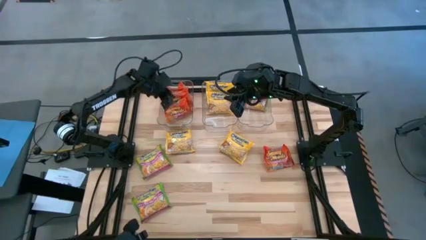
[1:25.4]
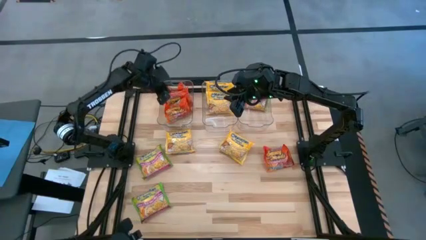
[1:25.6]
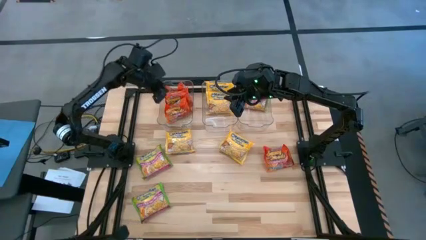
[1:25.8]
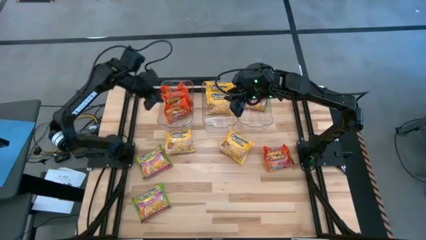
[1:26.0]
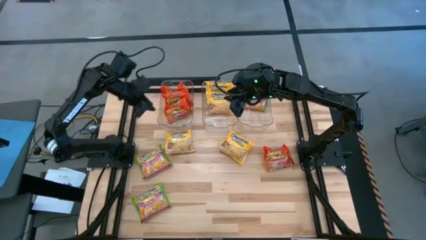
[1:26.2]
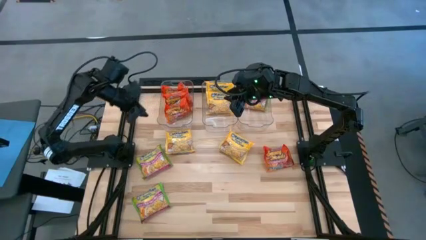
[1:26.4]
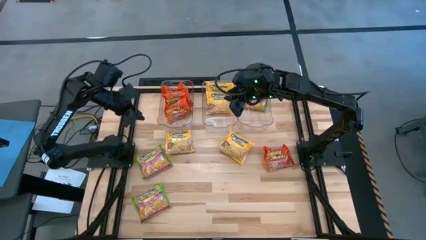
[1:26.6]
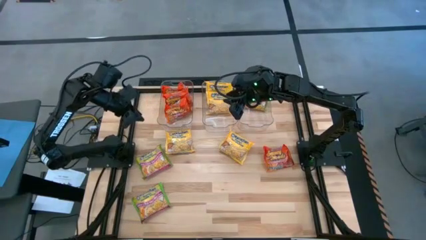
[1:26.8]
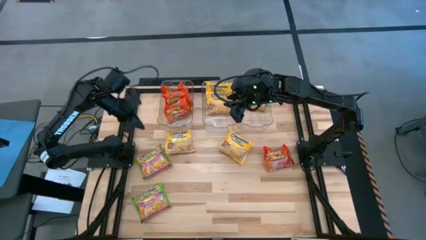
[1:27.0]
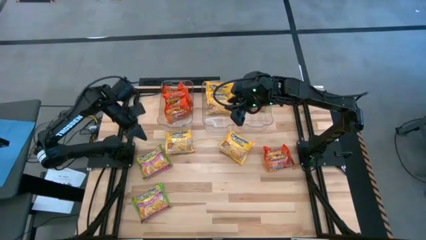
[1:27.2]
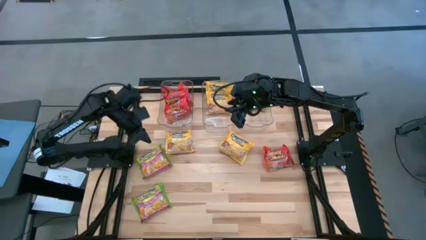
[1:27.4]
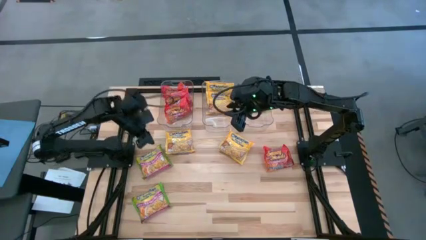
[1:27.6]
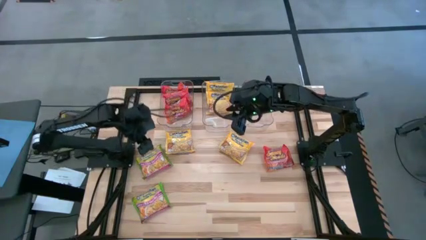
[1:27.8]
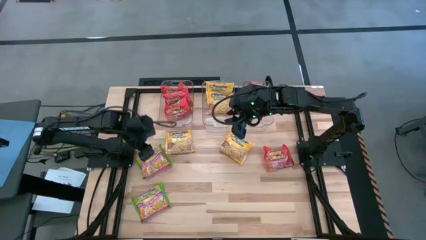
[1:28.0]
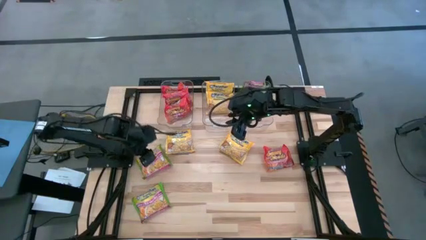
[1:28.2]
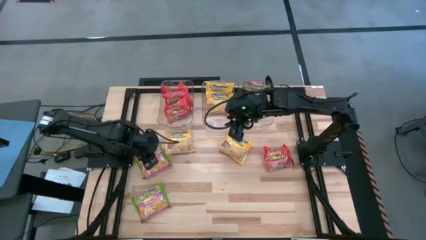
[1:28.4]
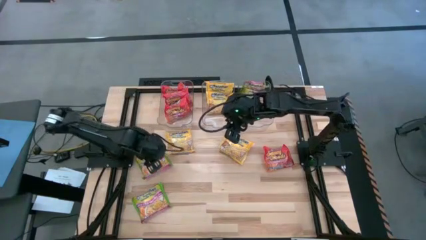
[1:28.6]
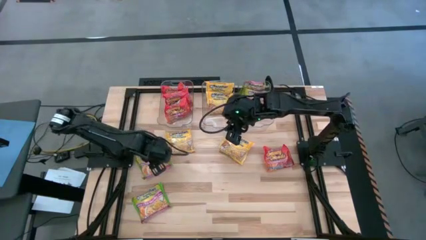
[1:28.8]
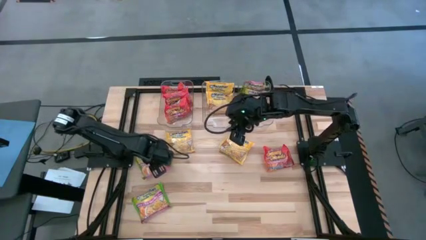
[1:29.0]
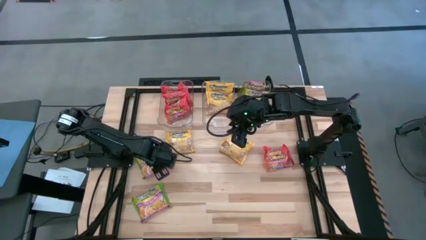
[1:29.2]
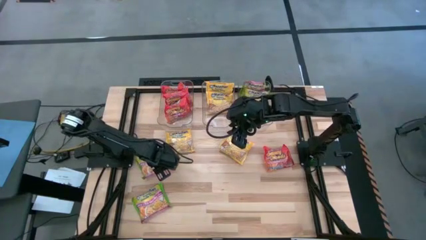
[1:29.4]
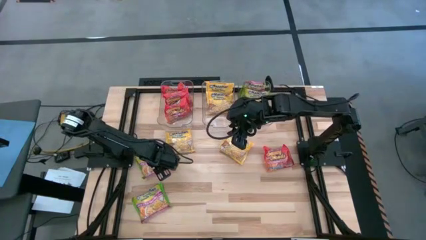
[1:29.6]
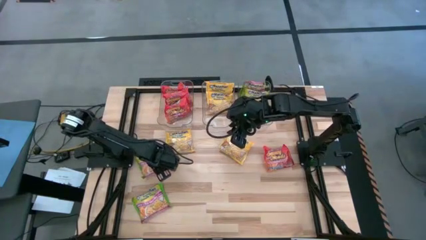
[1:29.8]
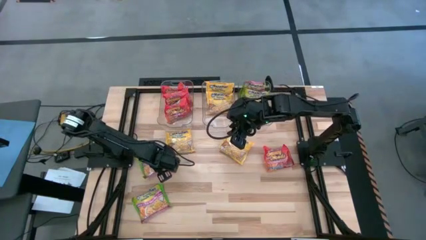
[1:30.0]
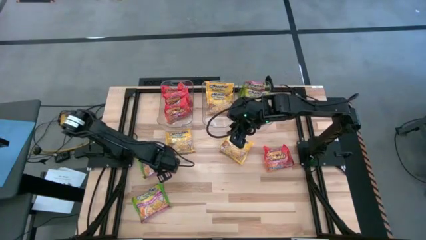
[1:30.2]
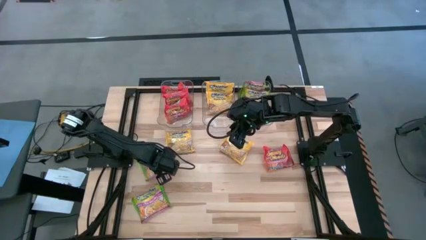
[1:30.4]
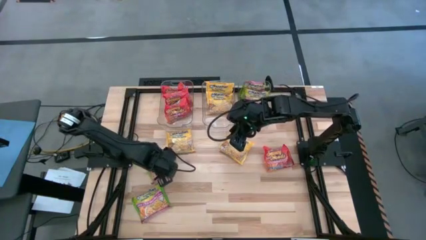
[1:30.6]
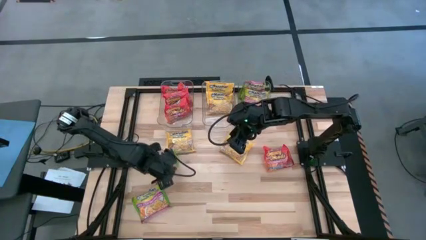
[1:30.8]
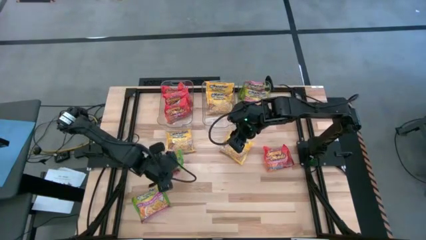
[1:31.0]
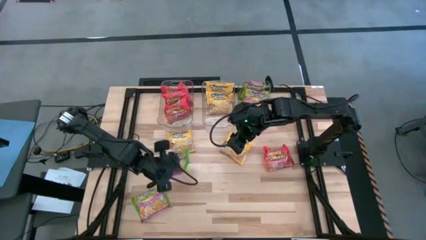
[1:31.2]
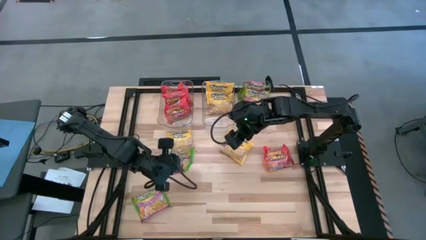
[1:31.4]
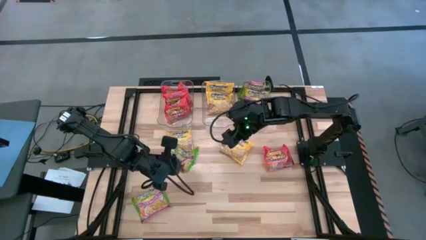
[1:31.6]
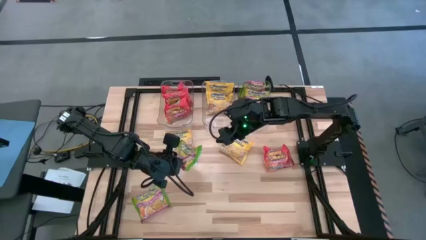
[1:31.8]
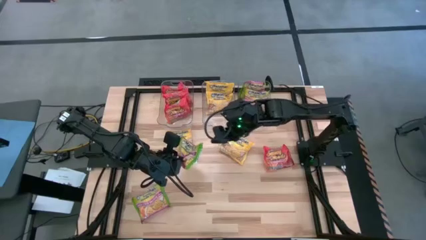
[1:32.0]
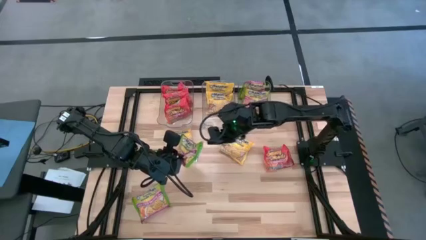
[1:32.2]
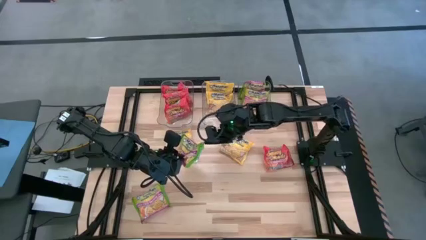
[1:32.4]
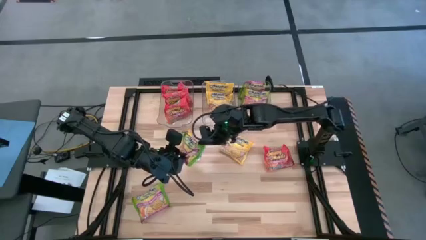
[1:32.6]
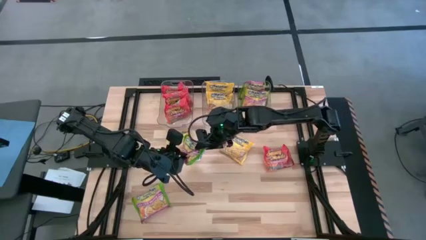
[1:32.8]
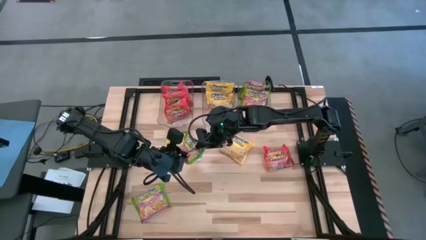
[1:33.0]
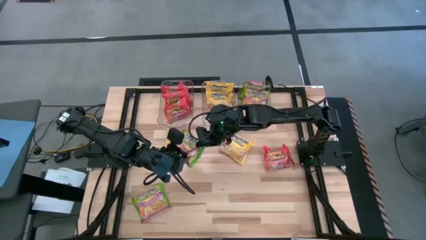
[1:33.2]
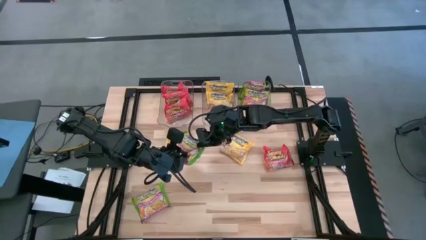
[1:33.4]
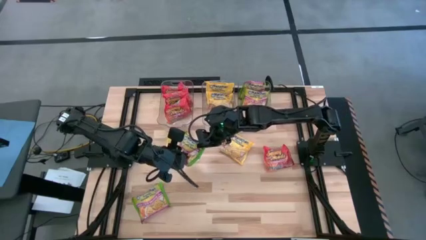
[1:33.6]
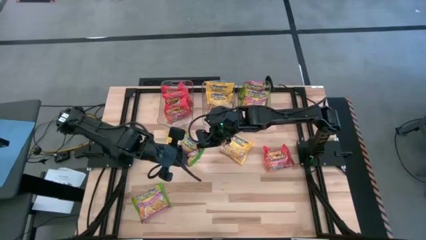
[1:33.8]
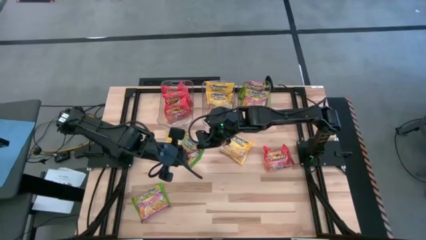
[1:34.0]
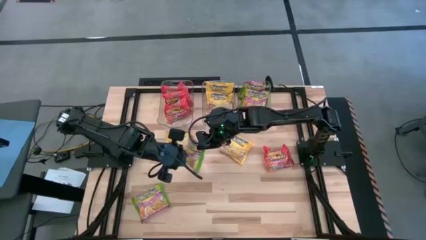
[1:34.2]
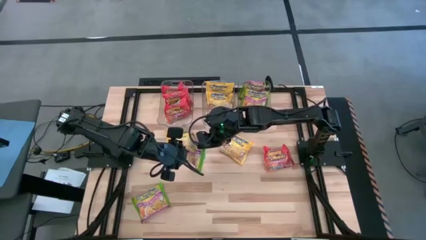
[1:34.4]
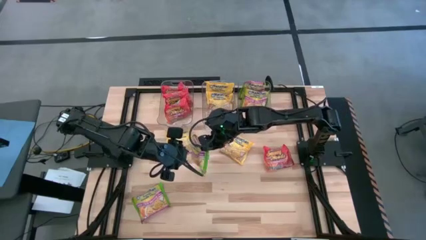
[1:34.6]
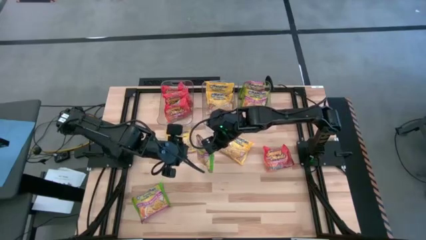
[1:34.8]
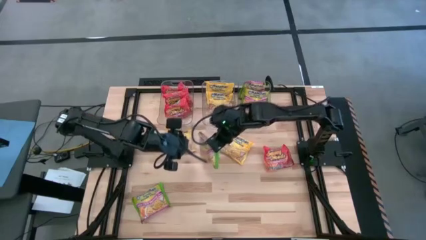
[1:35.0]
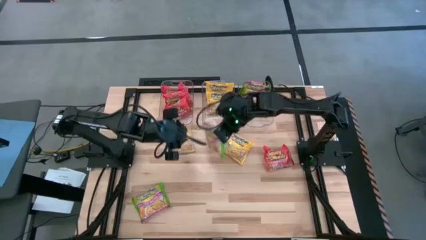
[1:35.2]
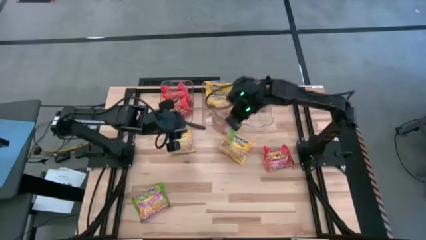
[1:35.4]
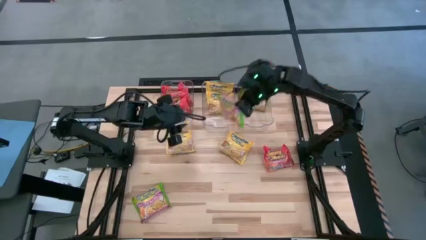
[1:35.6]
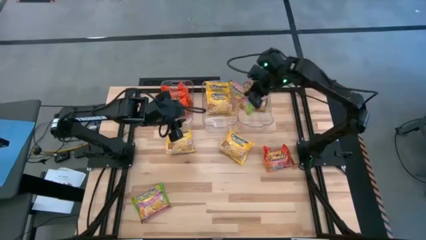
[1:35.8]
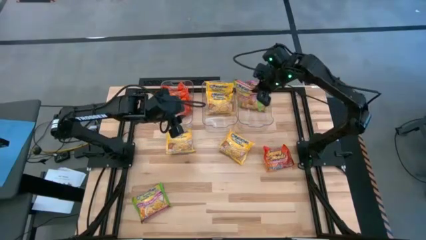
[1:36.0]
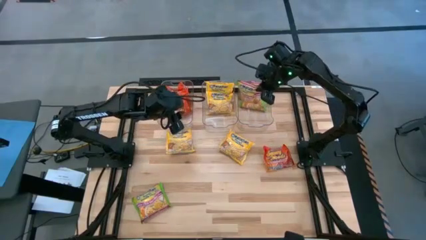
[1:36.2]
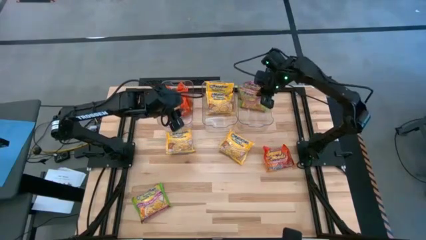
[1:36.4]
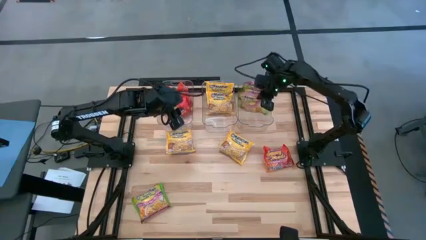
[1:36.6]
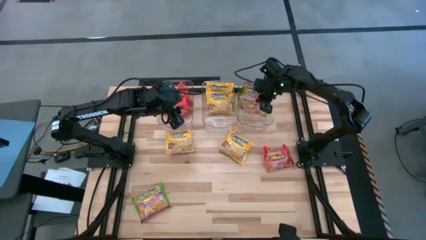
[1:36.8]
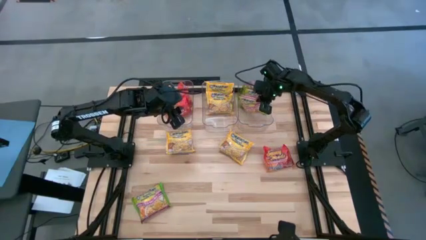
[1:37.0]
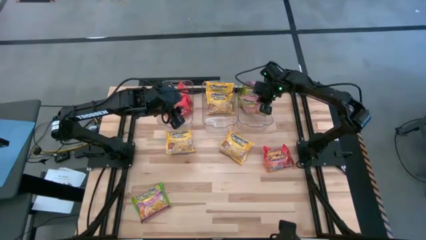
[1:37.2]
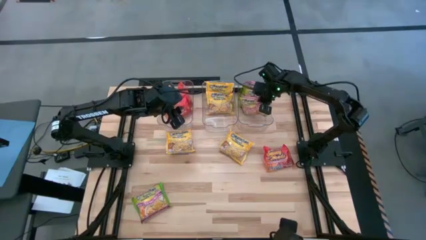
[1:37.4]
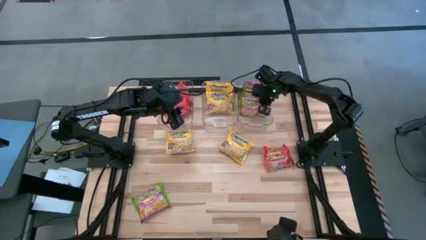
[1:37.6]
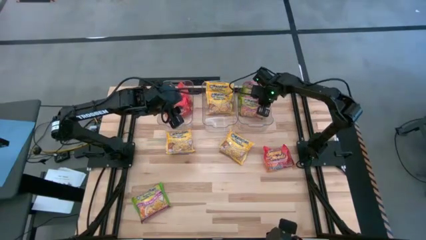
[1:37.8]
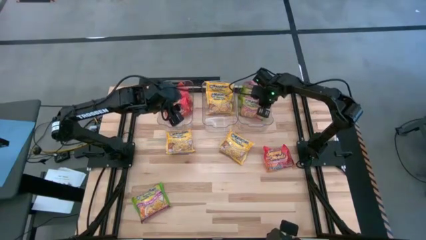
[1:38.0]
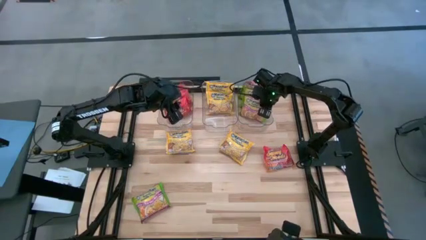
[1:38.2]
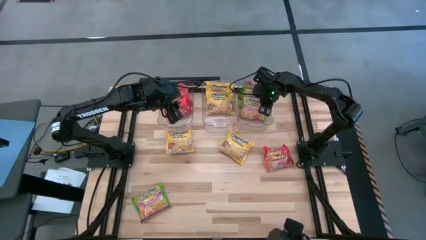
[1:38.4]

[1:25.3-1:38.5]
Task: Sort Maruchan noodles
Put the green noodle pack into the right transparent bin

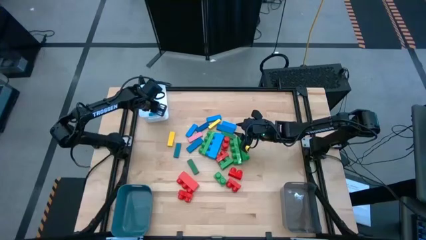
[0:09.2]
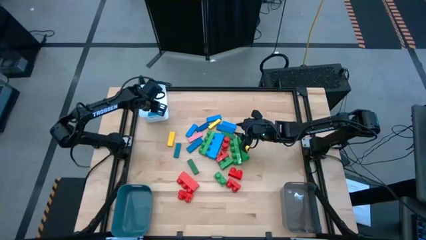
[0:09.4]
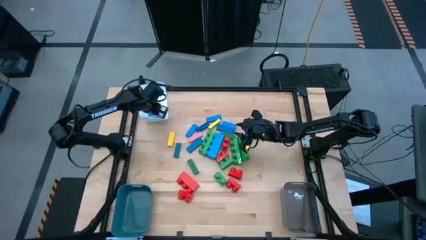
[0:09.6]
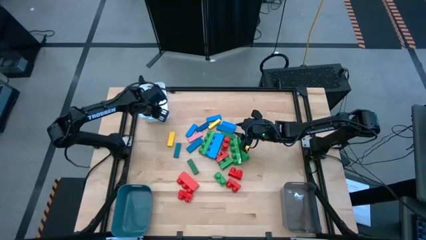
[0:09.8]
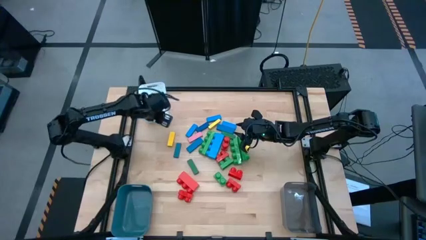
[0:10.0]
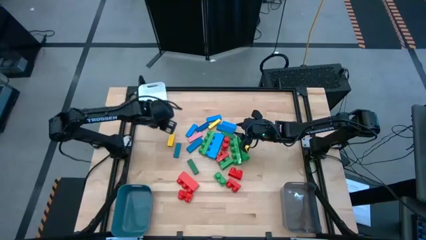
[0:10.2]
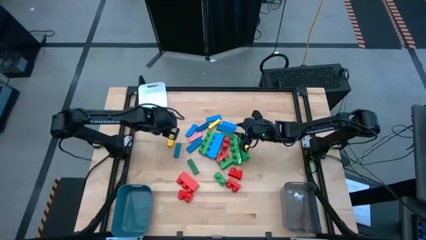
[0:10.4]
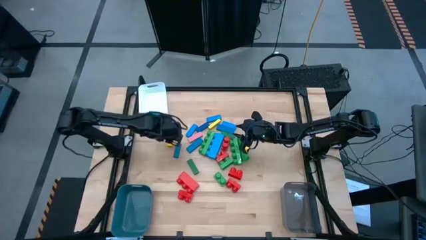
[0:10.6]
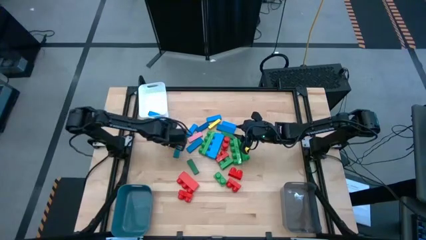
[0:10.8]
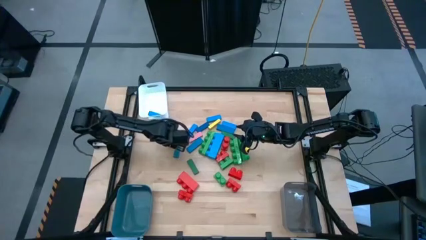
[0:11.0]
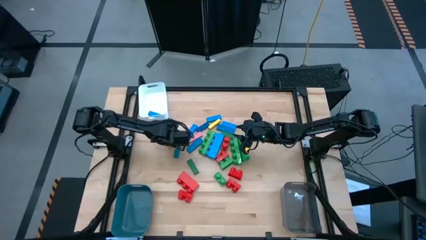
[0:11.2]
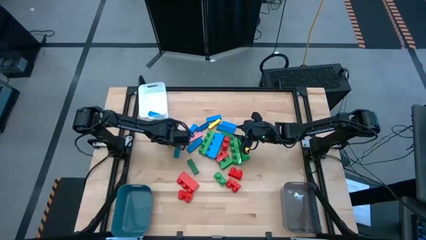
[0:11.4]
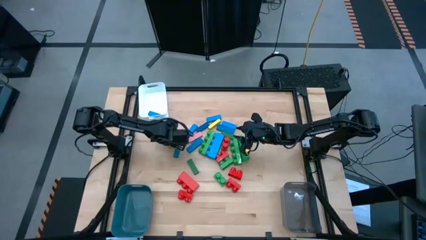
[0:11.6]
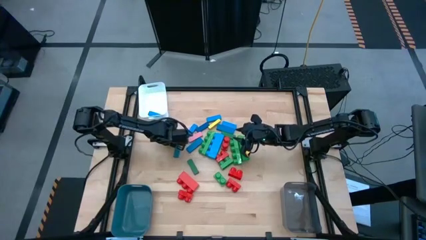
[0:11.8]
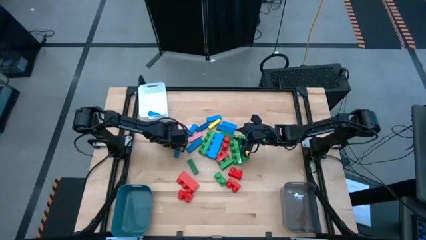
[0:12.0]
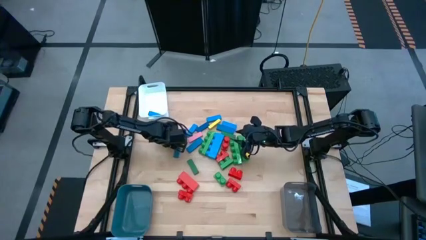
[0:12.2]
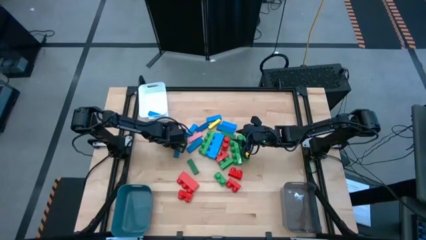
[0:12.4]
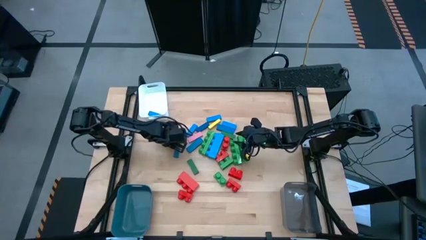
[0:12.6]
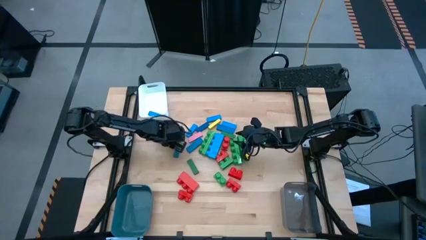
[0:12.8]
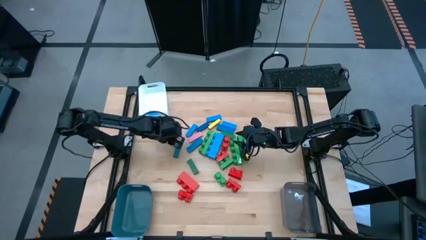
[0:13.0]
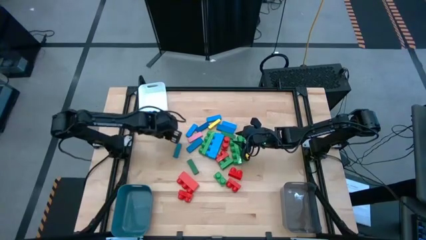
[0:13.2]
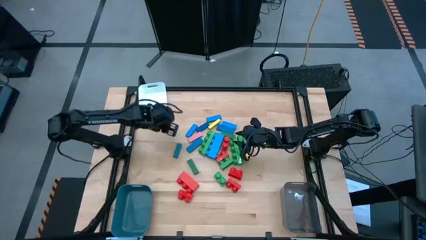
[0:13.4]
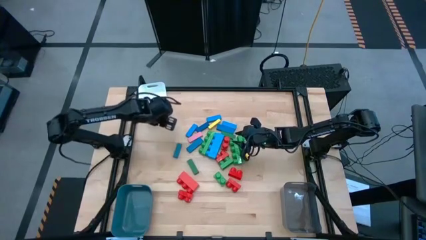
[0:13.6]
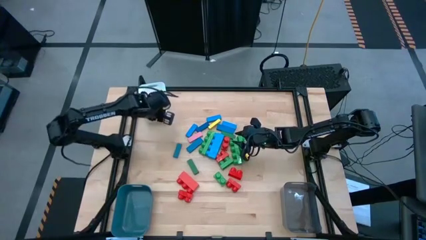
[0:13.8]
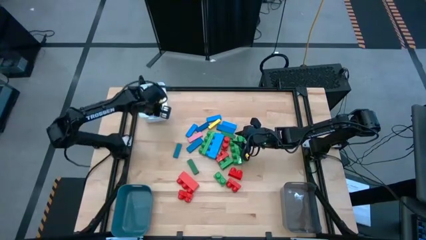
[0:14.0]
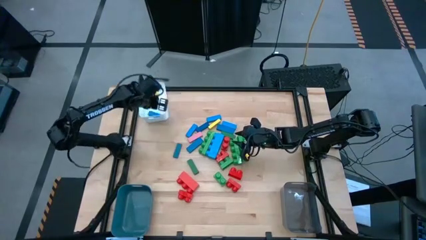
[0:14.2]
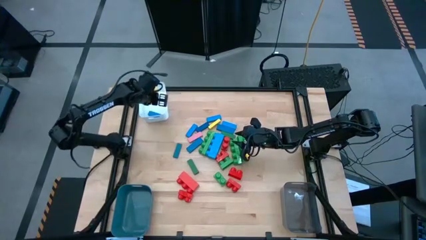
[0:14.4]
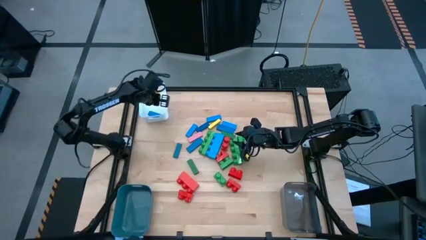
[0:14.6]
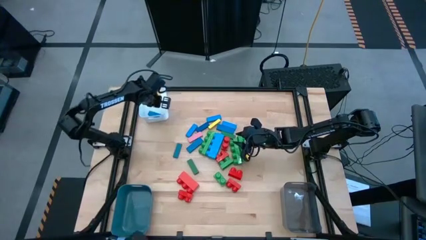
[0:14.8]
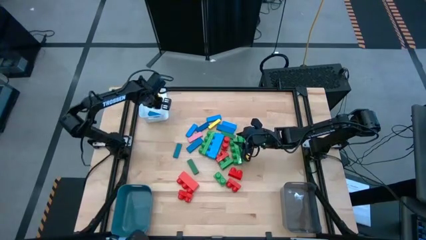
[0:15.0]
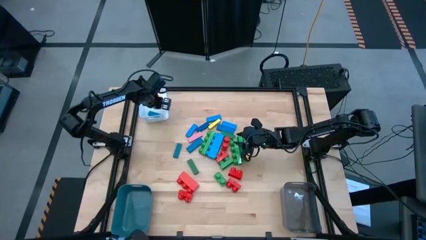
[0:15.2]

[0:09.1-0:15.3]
Task: Sort blocks by size
Put the yellow block into the white bin
